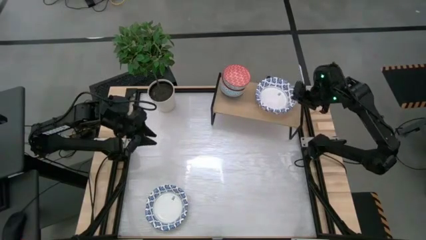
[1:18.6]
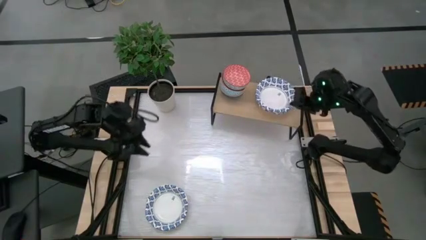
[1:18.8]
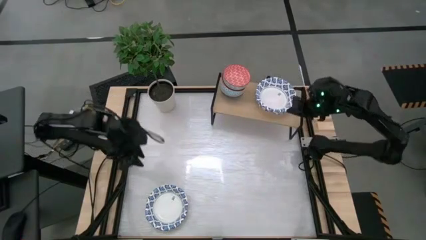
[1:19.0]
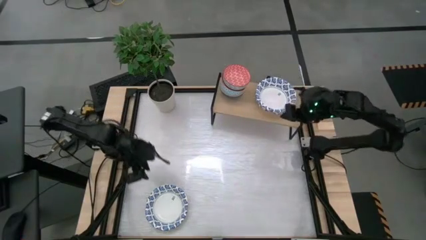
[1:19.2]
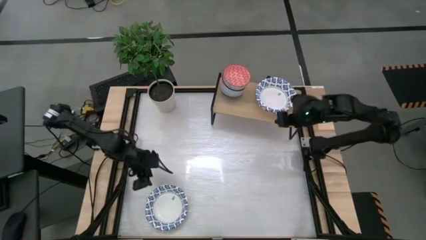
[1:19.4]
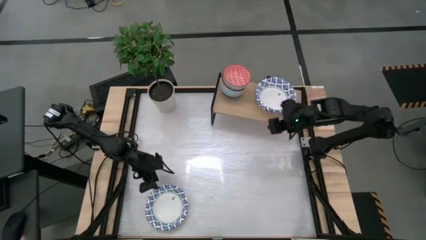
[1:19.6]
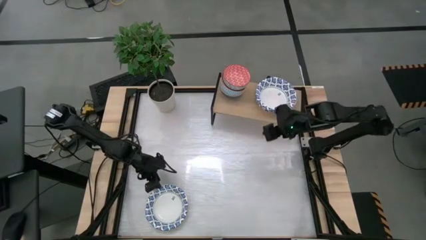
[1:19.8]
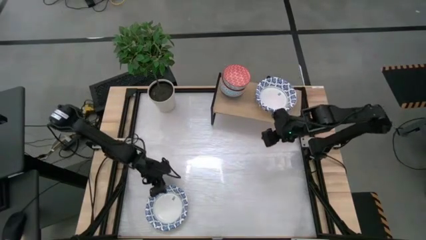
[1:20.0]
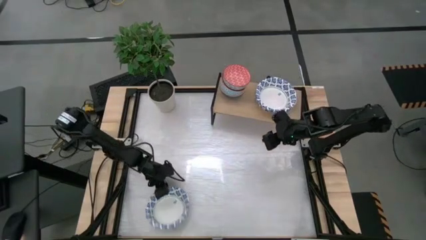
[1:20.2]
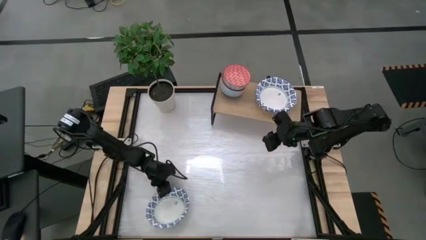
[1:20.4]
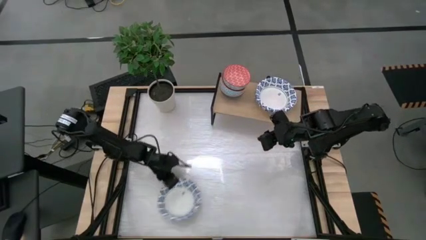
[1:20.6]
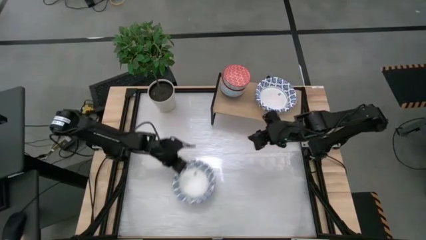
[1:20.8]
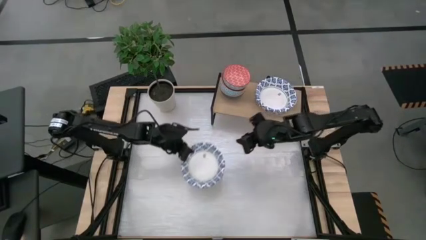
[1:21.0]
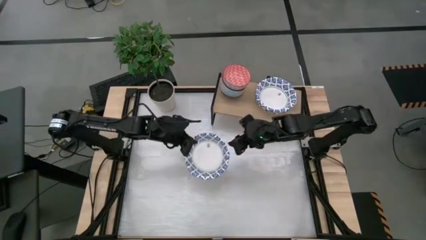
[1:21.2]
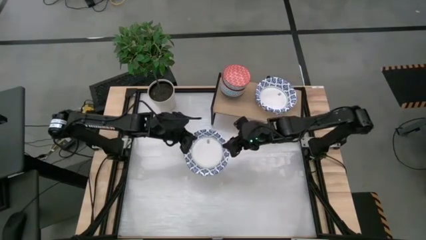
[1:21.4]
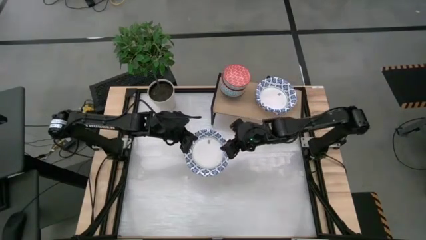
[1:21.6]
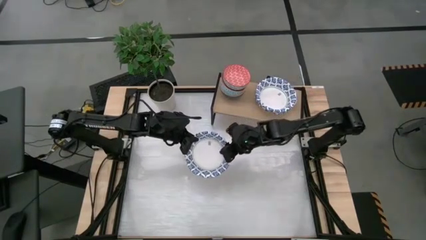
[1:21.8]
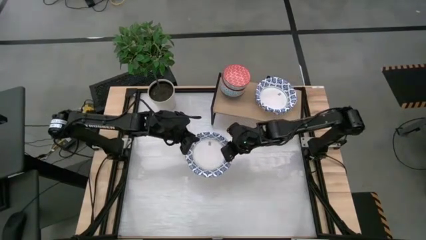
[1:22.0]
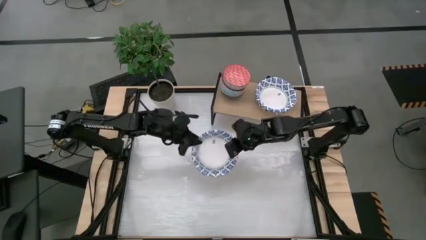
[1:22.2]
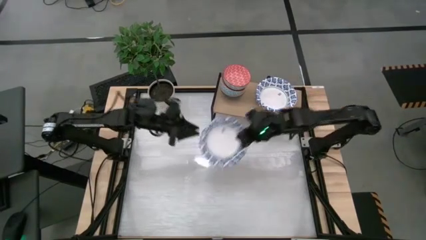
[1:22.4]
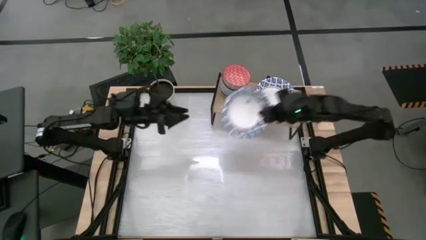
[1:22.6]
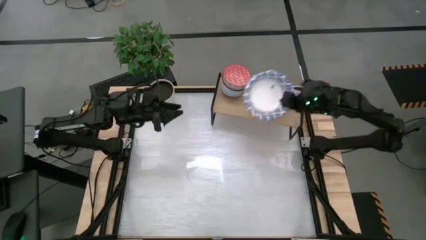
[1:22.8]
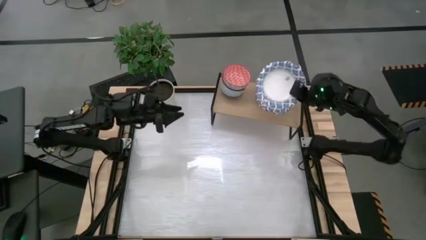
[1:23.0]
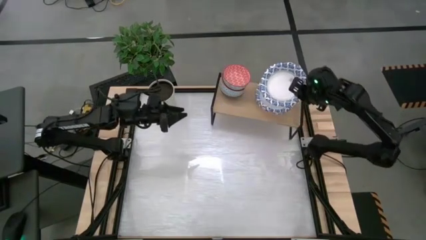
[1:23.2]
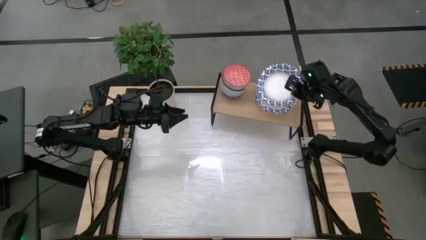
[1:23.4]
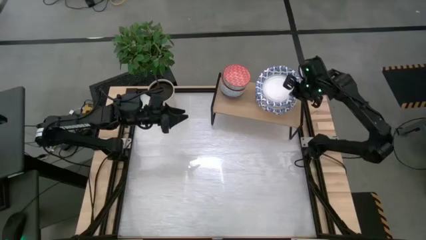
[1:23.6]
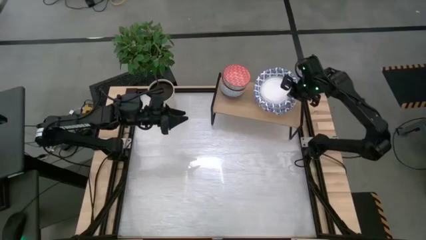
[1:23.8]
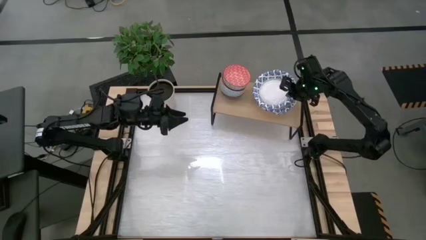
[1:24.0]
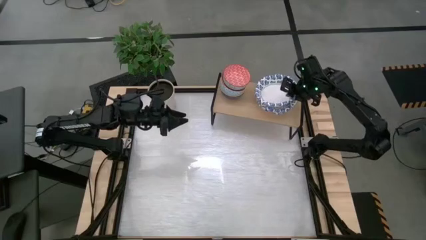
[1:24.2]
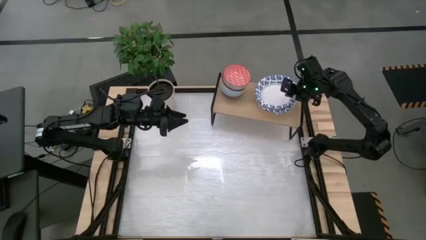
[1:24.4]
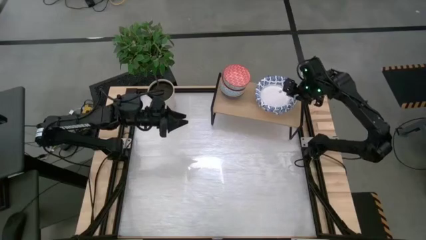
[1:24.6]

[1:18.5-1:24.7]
Task: Place and stack bowls onto a shelf
Stack the white bowl on top of the white bowl on the shelf

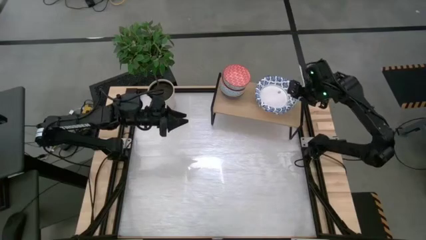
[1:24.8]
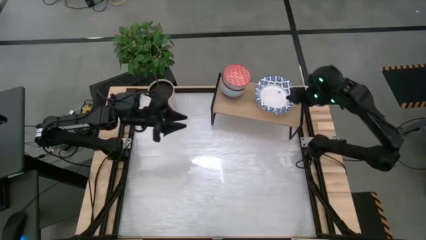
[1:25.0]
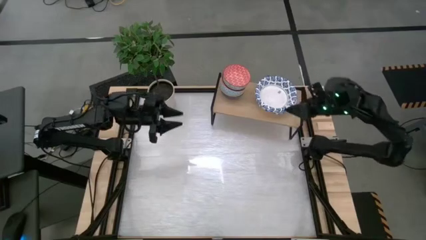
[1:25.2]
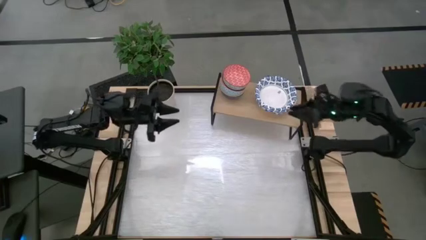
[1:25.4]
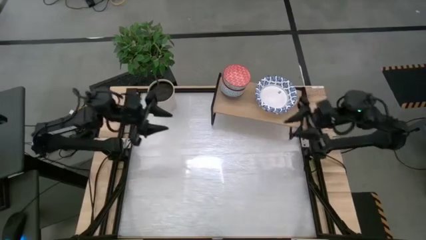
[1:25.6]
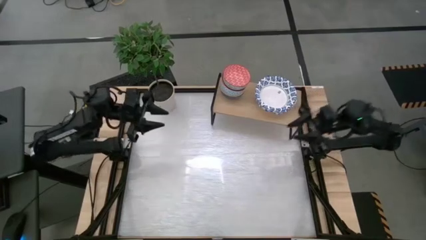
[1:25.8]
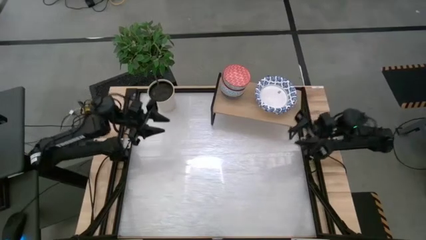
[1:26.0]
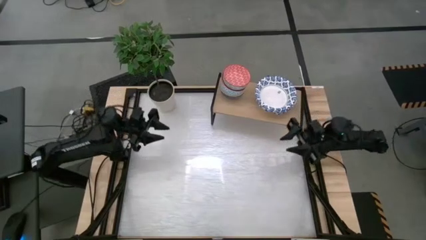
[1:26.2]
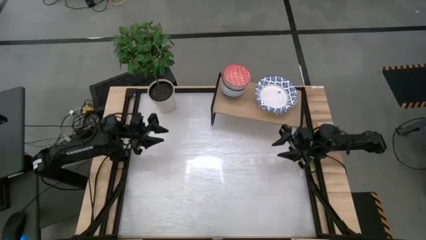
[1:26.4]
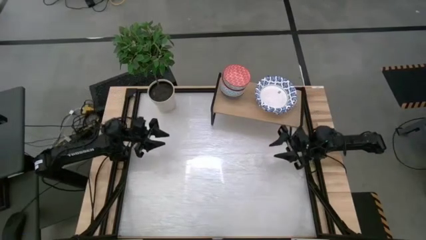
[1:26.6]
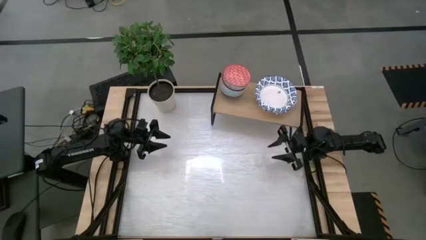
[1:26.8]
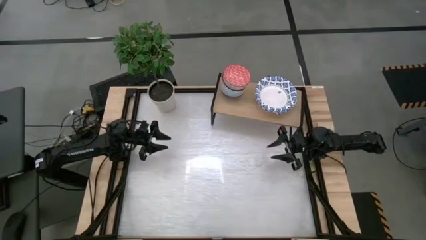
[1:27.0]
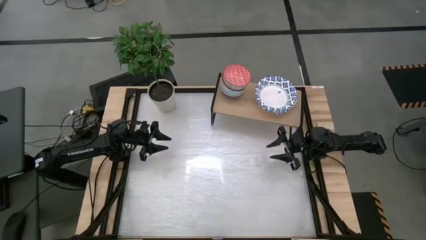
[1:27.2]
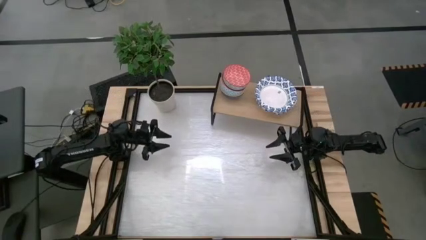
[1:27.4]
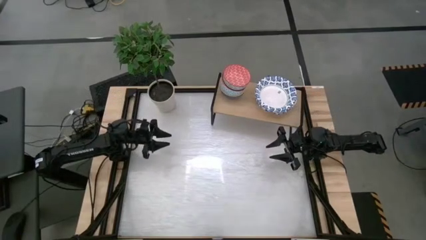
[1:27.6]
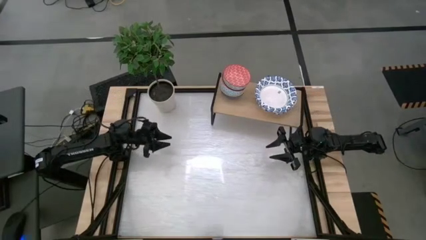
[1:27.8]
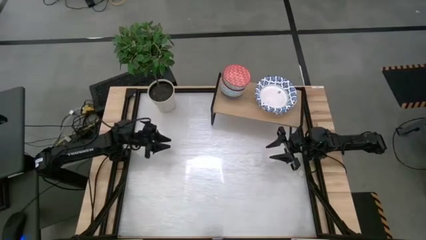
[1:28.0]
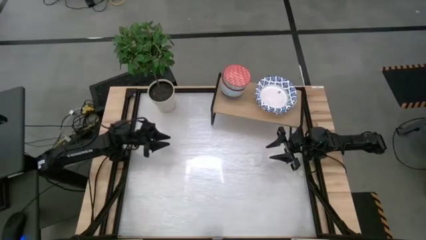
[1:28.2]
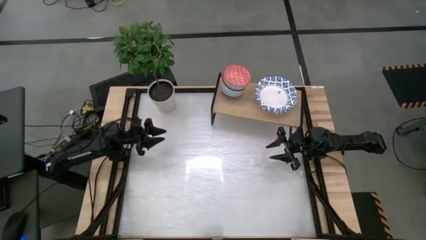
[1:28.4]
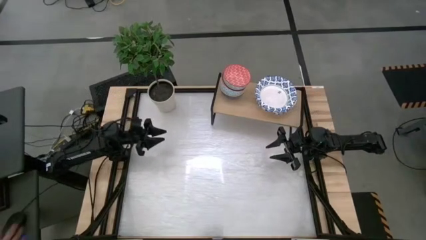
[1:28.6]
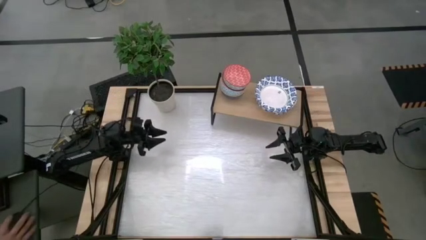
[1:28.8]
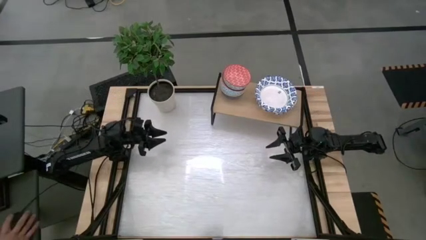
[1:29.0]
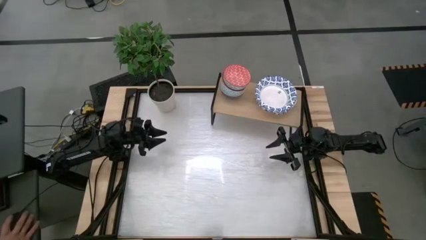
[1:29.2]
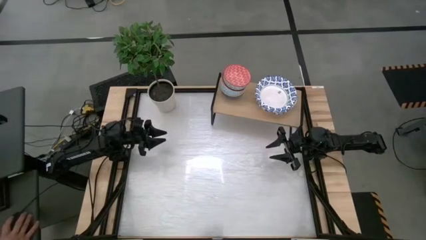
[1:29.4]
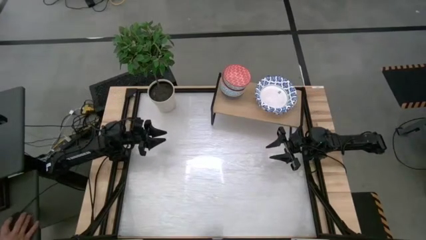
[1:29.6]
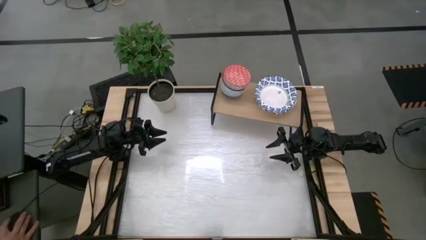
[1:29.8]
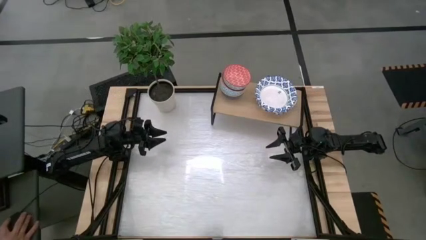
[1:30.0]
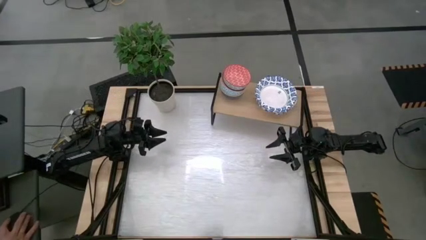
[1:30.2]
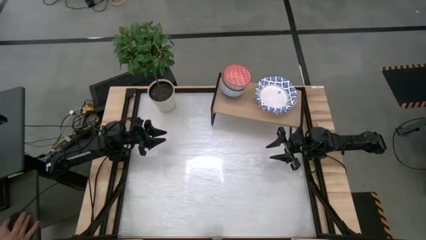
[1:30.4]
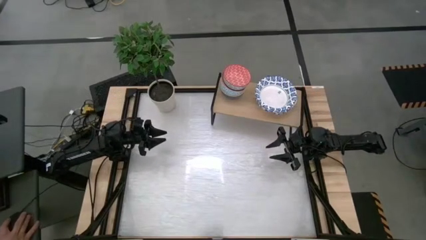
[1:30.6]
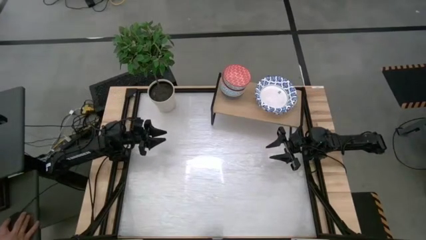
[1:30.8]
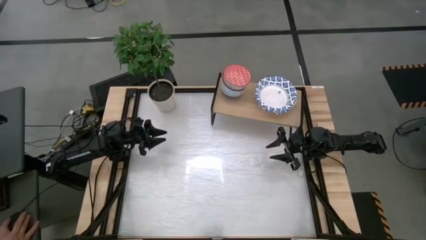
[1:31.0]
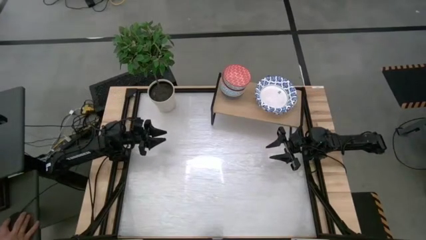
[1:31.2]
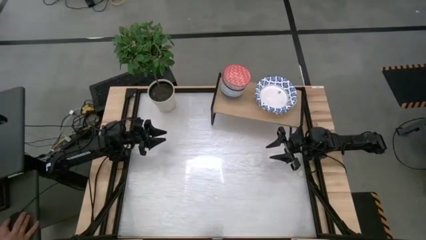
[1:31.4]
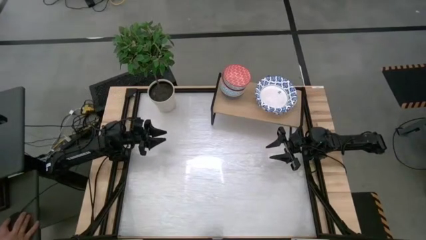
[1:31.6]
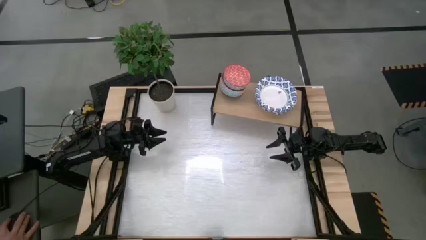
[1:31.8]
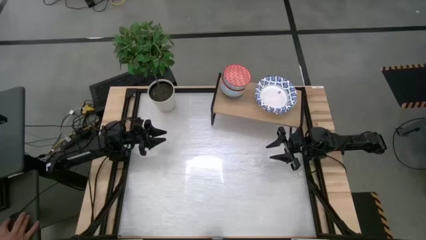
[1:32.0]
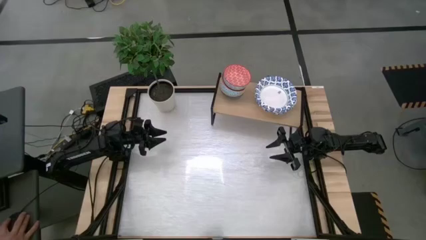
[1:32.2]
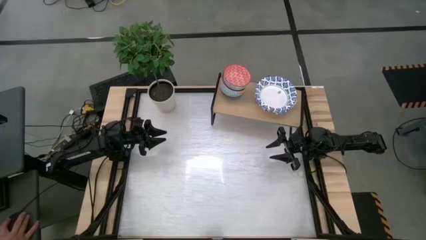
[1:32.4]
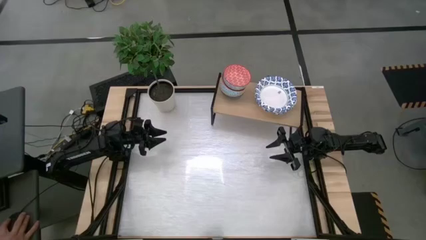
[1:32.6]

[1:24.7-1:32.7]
Return to Home Position
